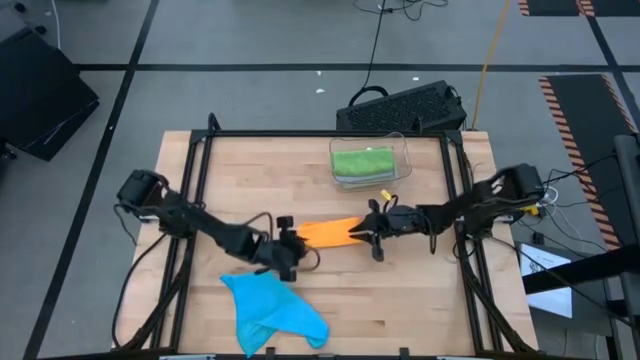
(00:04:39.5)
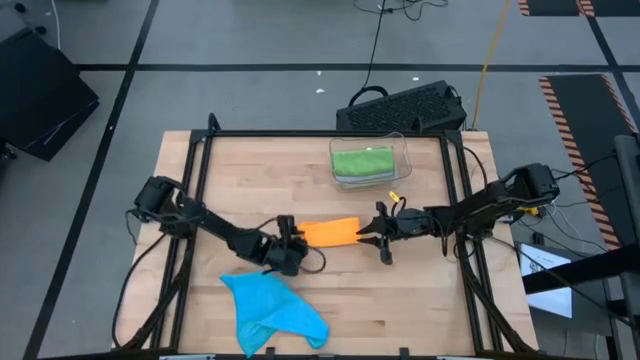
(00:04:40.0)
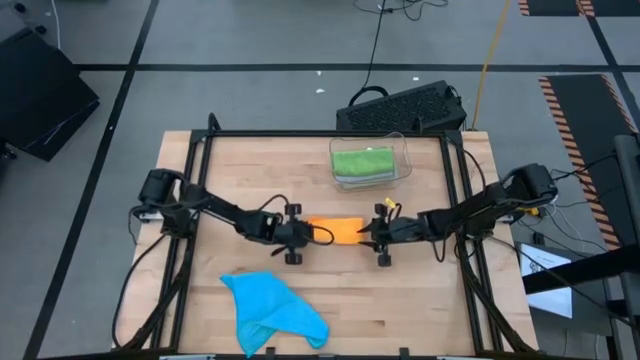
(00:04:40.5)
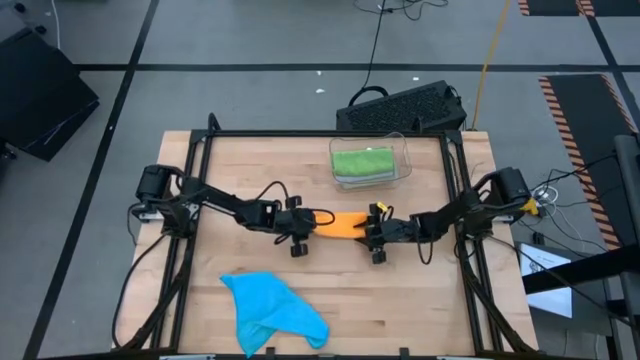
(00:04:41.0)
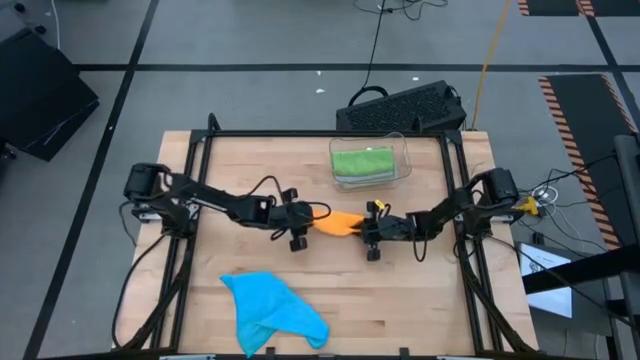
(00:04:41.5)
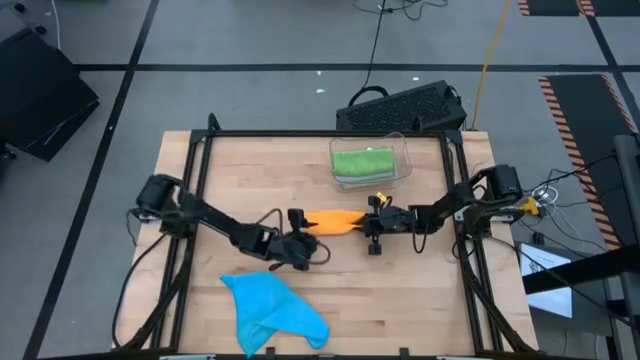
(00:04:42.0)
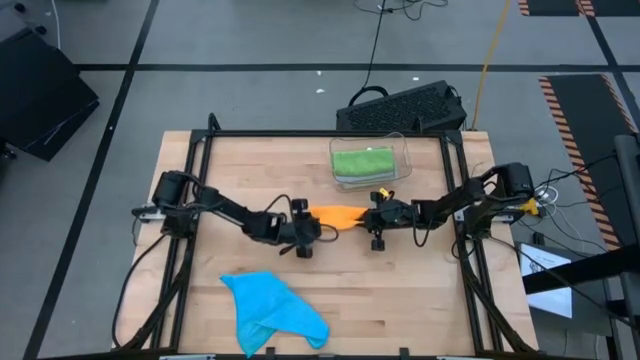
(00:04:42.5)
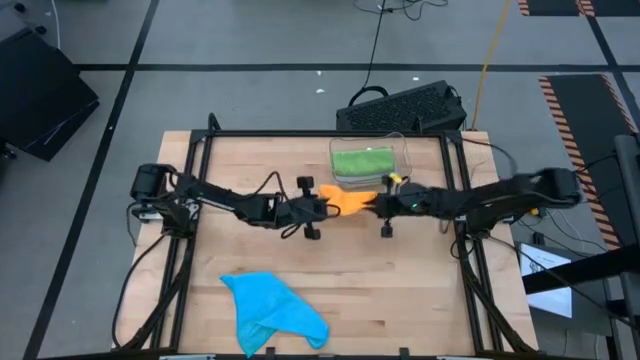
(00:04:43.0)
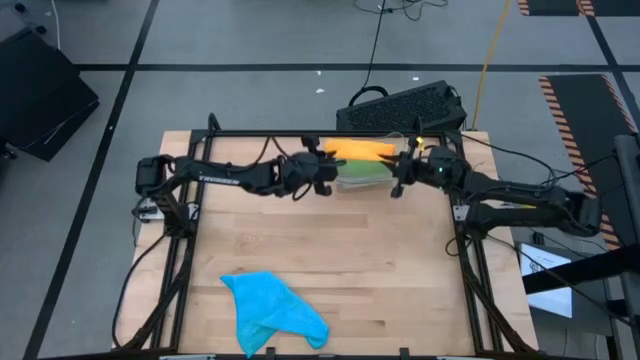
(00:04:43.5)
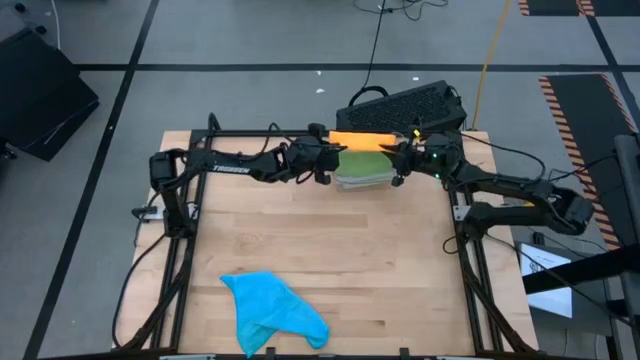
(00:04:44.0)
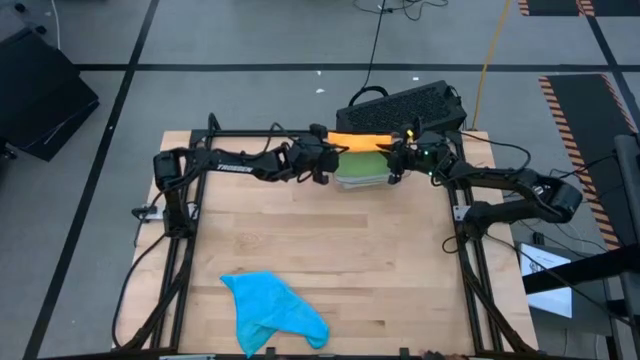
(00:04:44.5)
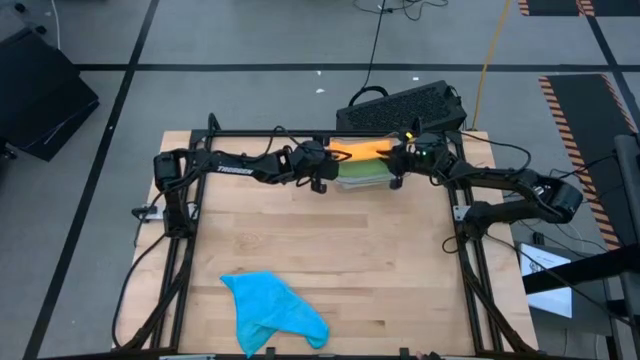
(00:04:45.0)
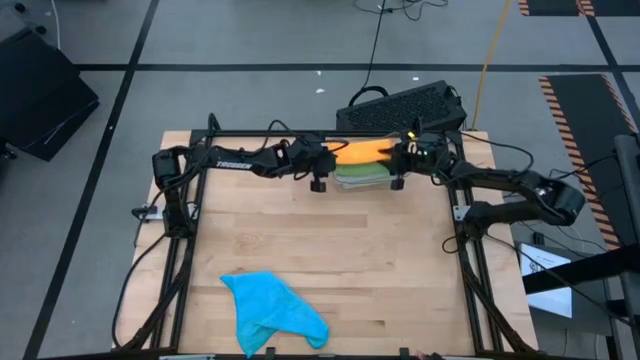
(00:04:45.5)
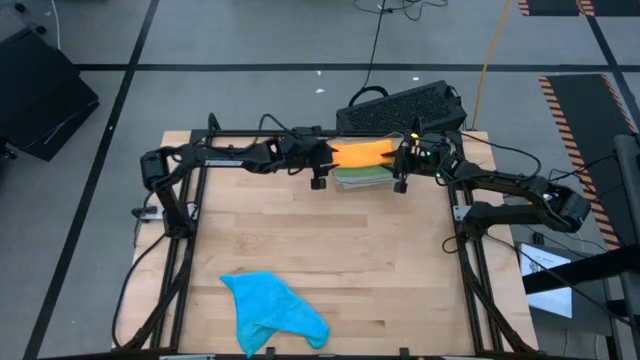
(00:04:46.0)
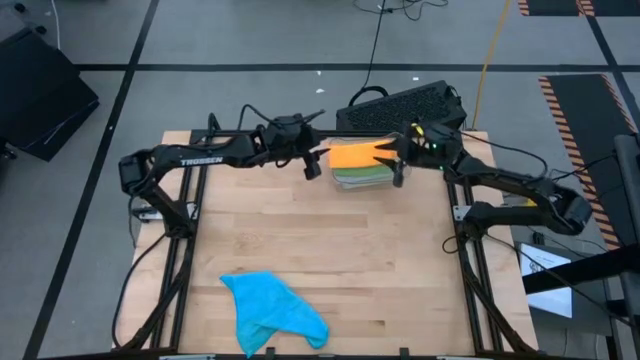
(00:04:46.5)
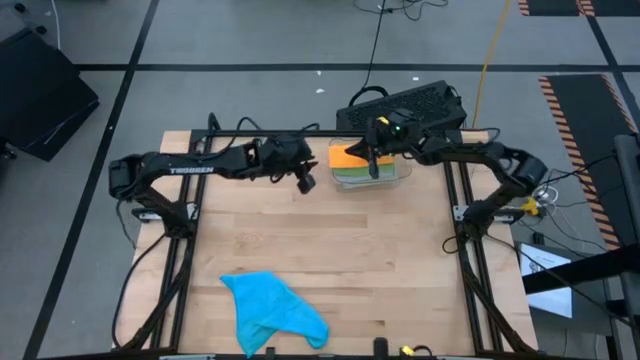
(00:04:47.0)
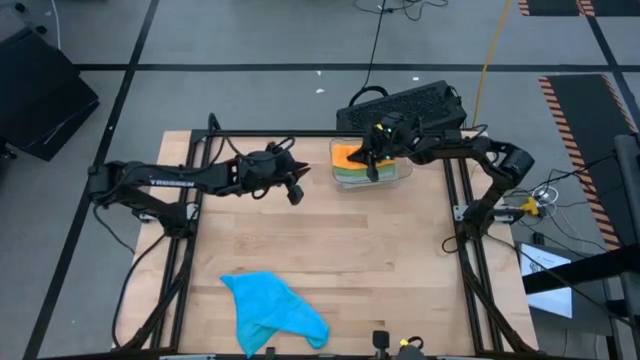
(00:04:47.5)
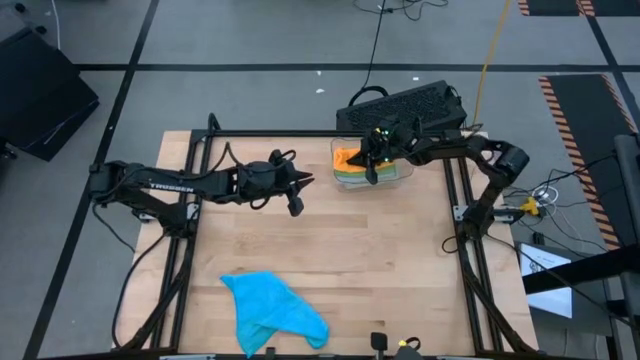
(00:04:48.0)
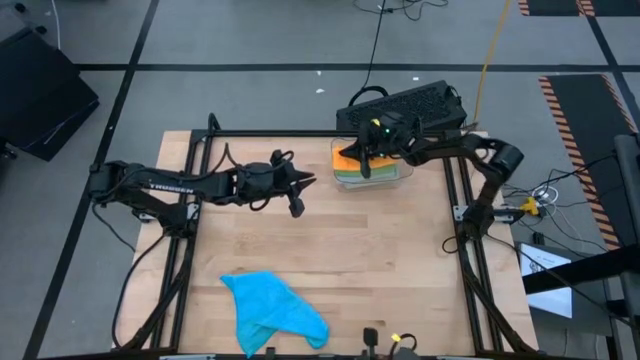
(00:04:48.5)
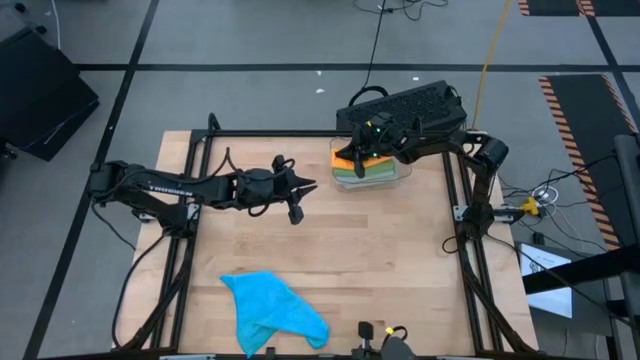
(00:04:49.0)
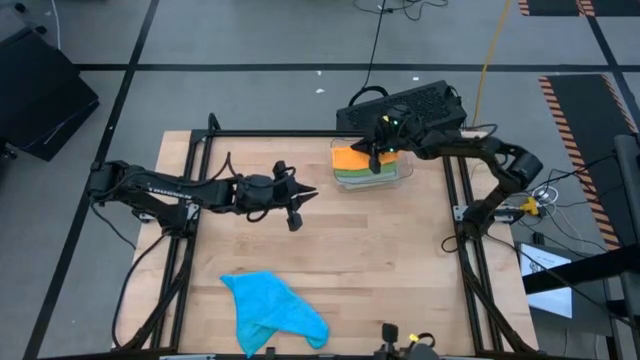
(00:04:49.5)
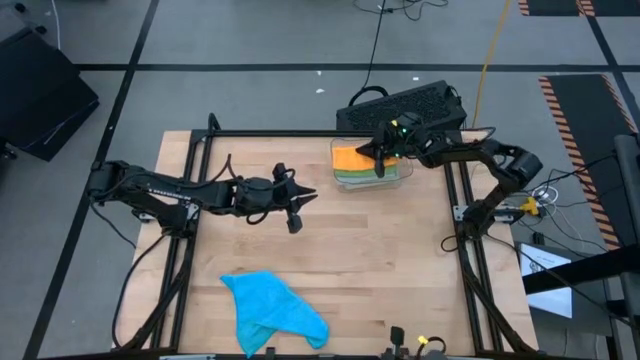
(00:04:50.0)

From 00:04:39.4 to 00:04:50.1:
Task: Fold microfiber towels
Put the folded orange microfiber towel into the transparent bin

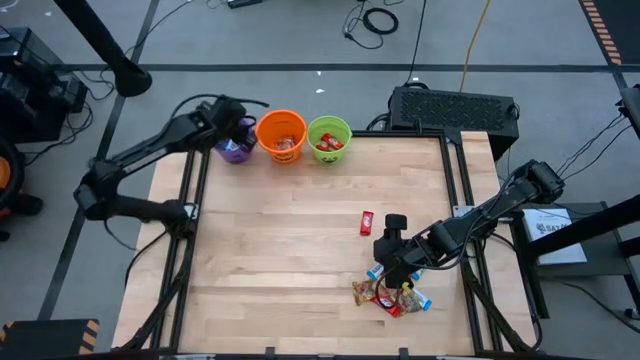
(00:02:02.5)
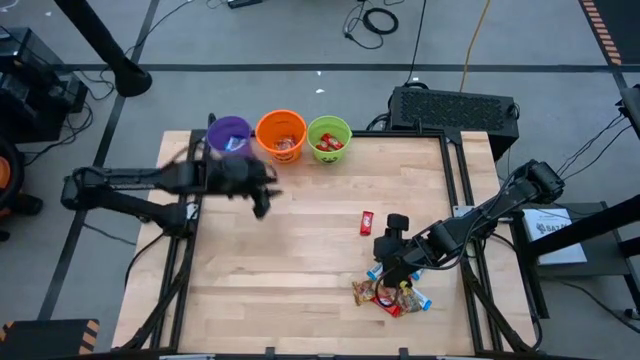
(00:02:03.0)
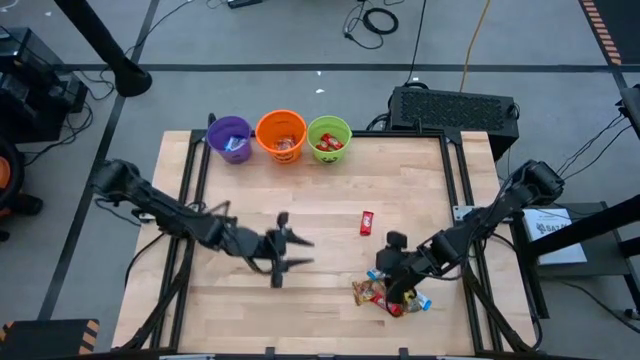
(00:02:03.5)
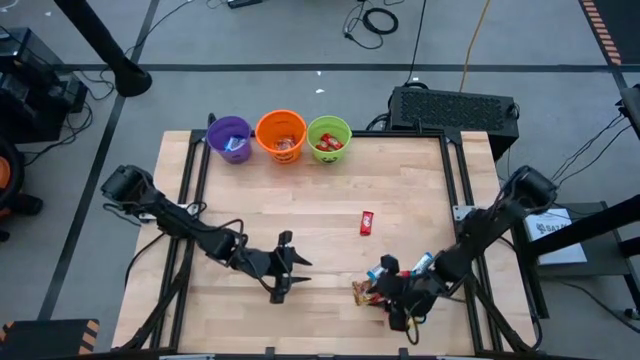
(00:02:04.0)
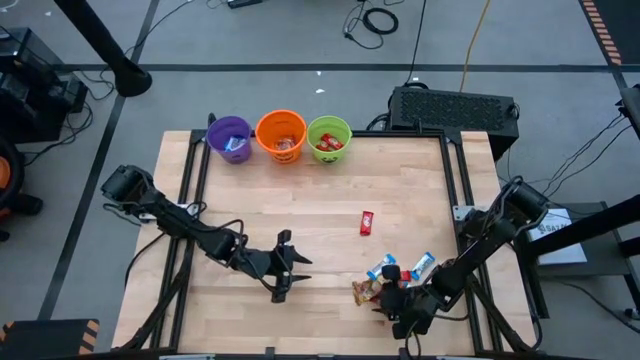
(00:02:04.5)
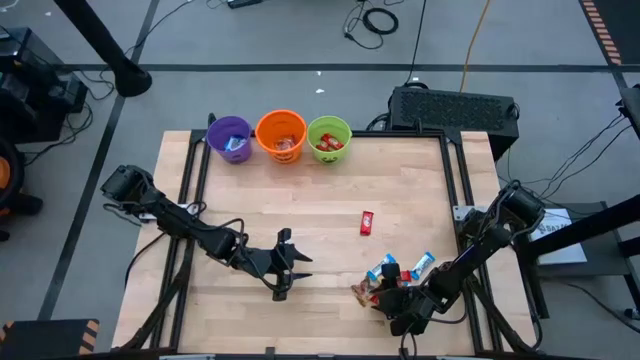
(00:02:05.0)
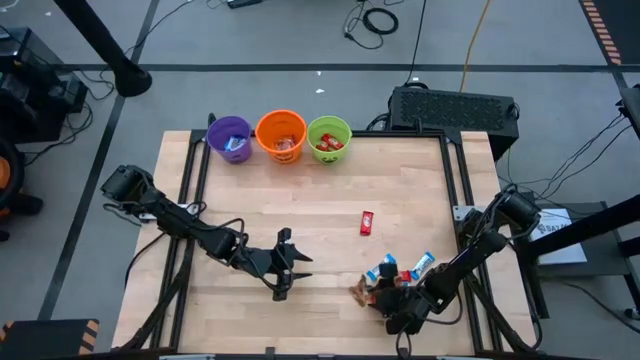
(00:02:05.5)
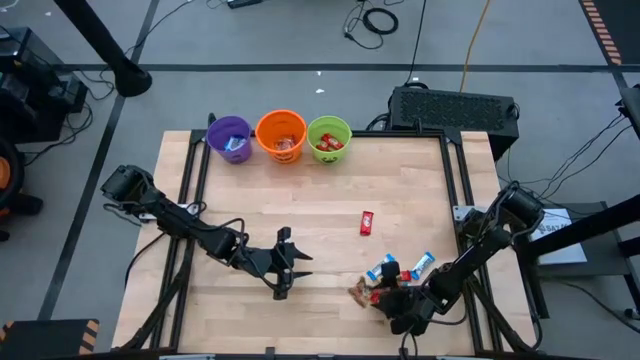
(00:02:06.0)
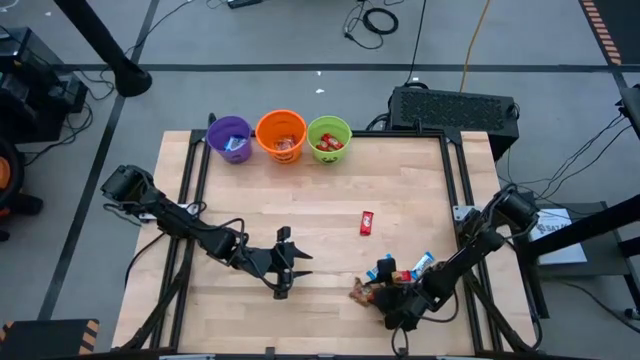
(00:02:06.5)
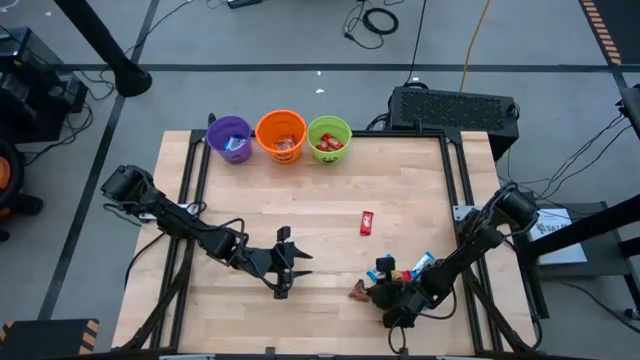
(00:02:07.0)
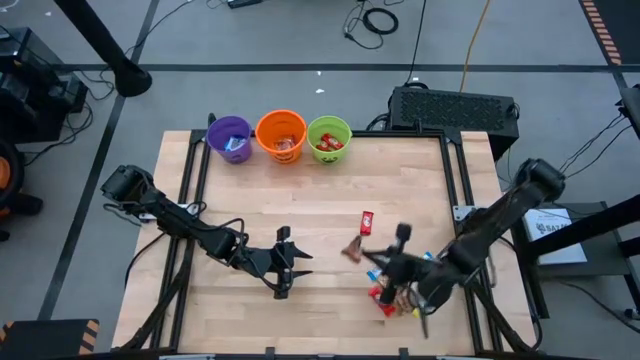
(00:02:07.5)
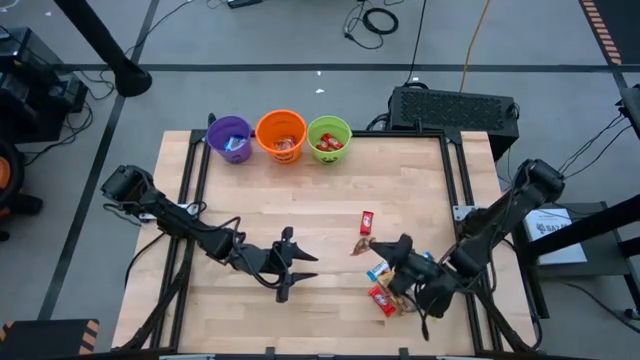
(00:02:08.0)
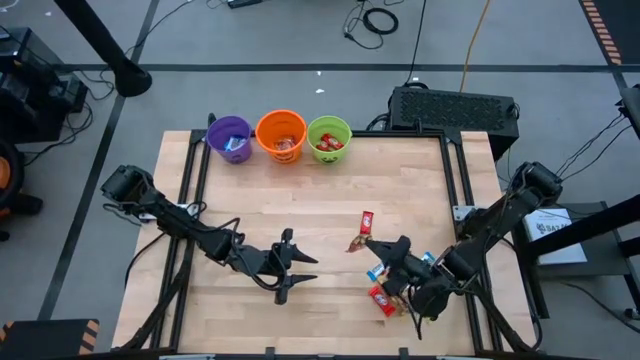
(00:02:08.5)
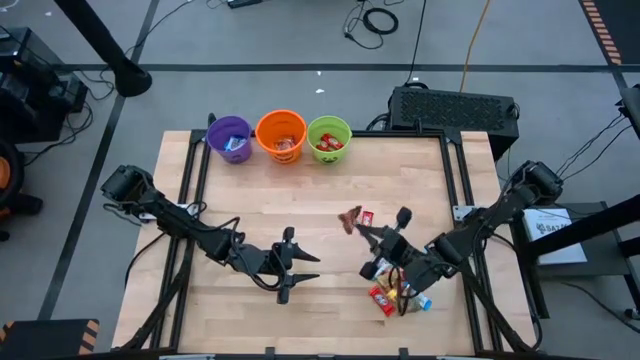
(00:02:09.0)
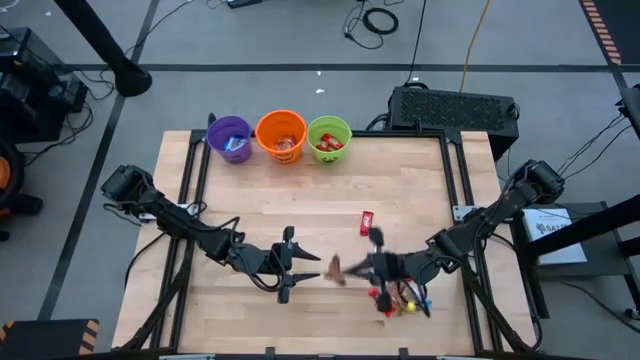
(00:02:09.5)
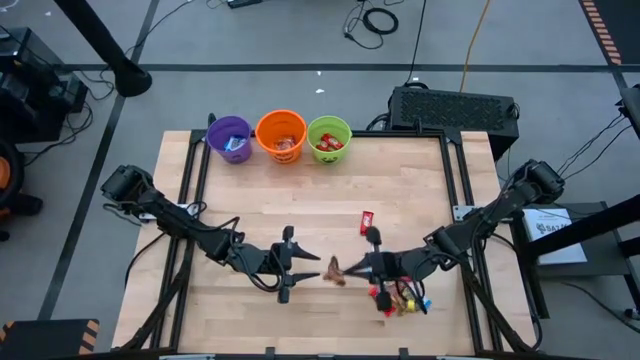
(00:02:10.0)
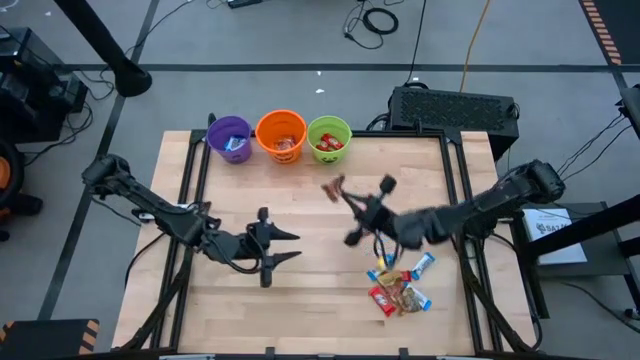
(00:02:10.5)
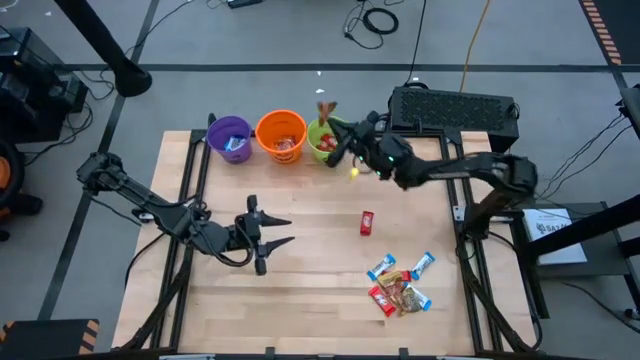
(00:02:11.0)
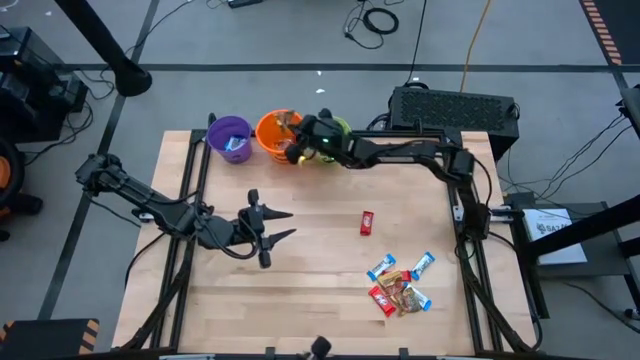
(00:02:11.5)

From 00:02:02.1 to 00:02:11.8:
Task: Sort candy by brand, put in halloween buckets
Put golden candy into the orange bucket
